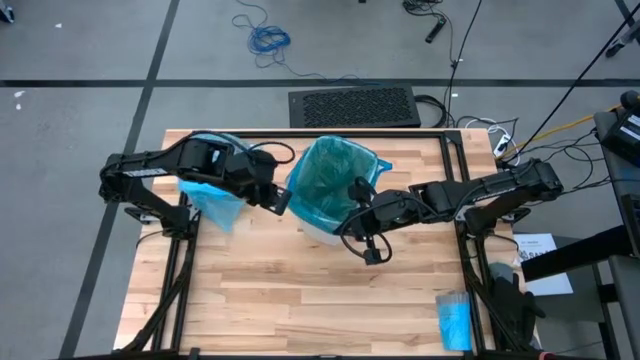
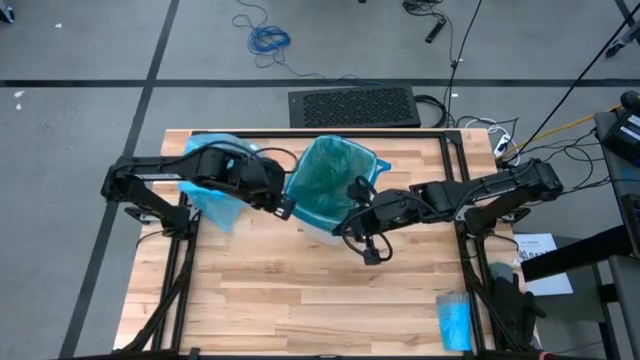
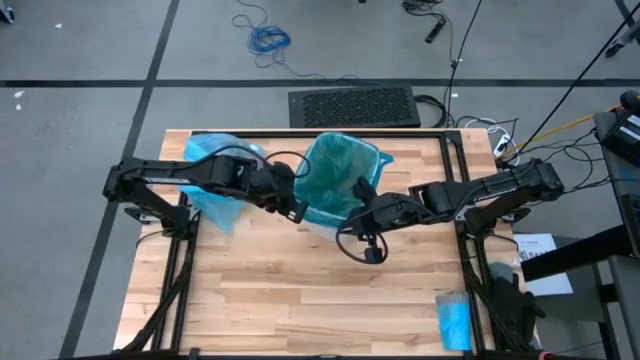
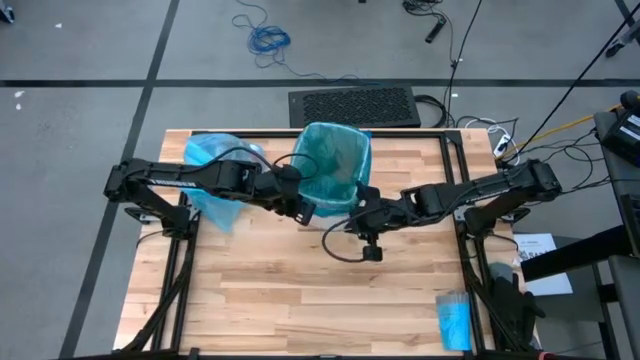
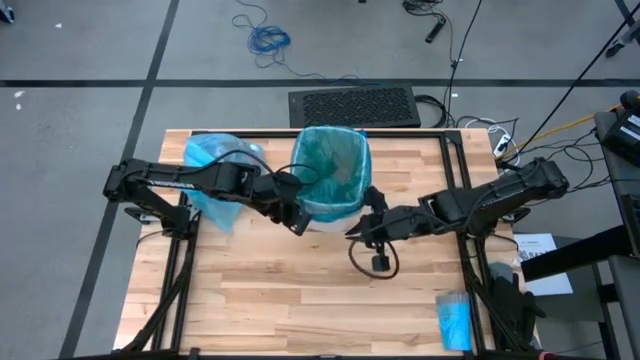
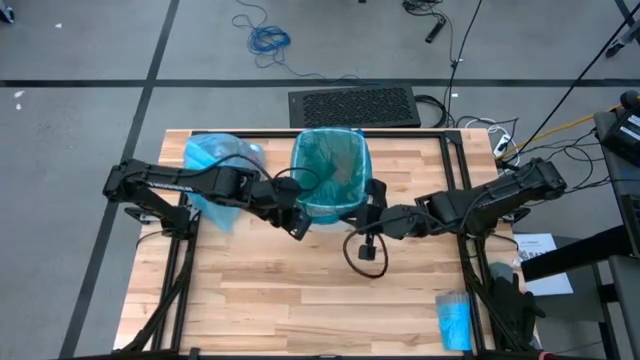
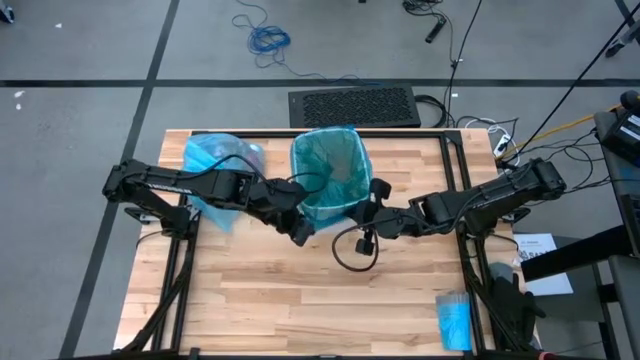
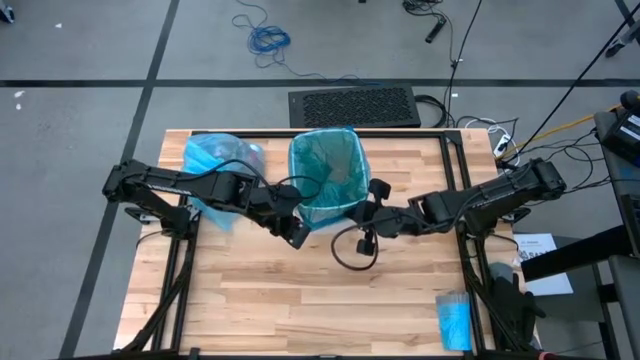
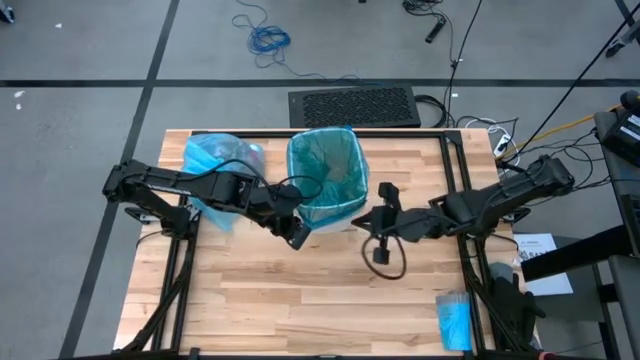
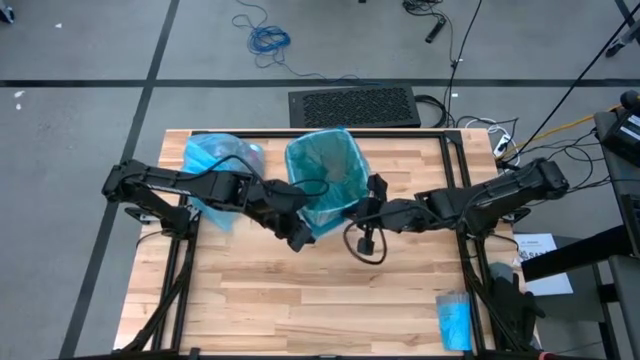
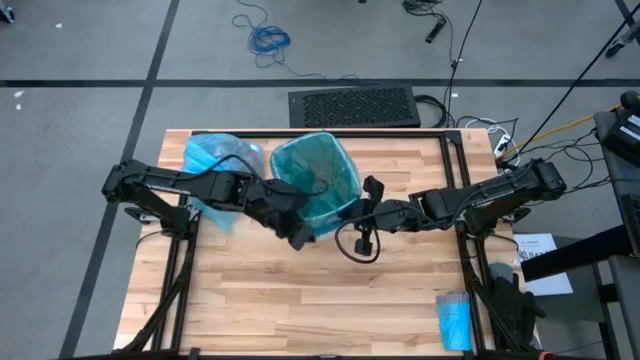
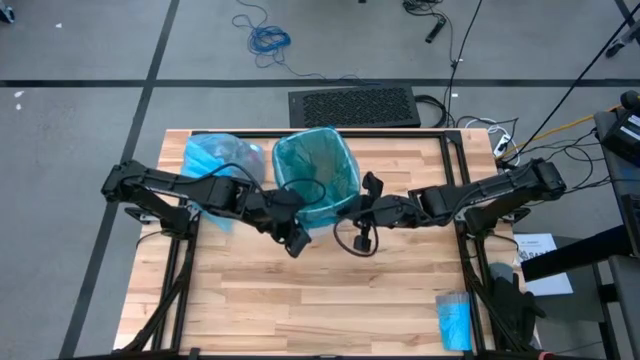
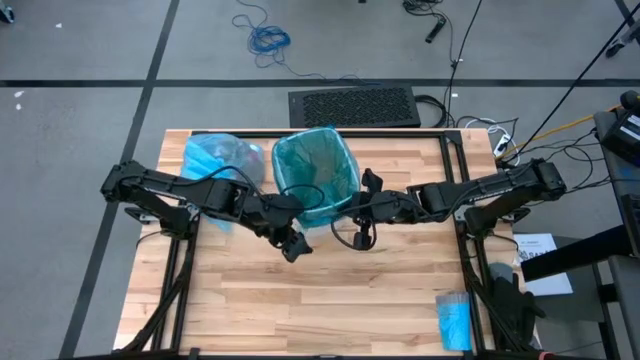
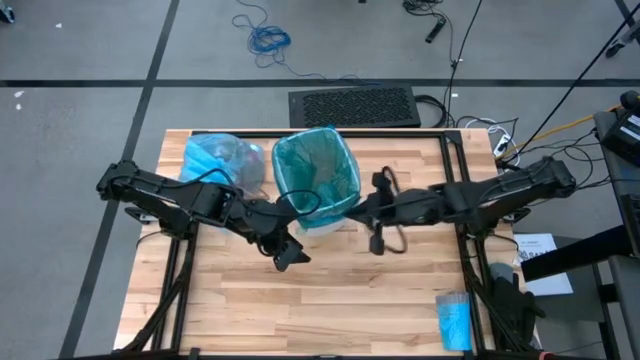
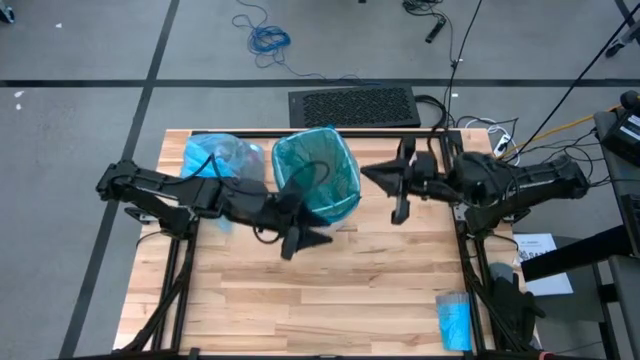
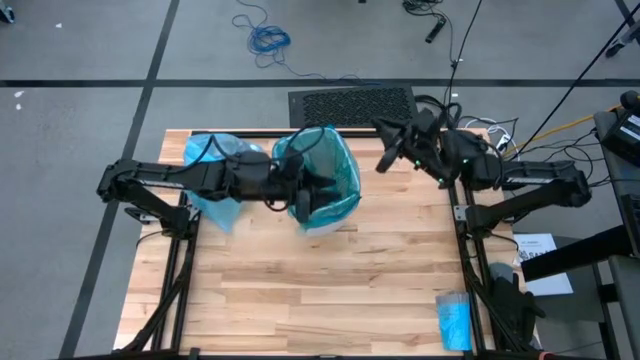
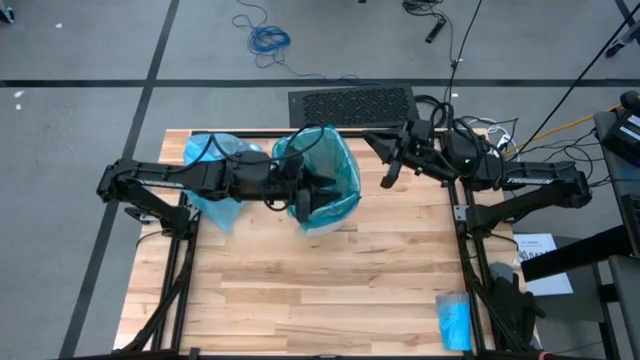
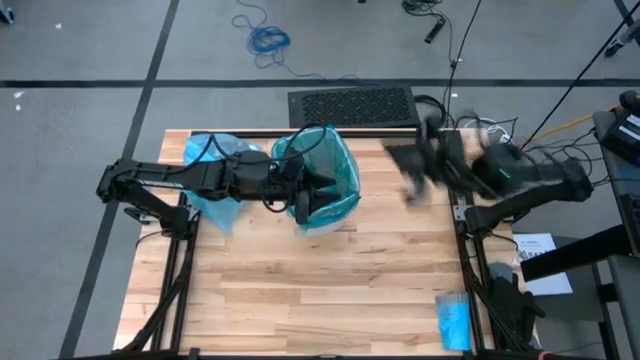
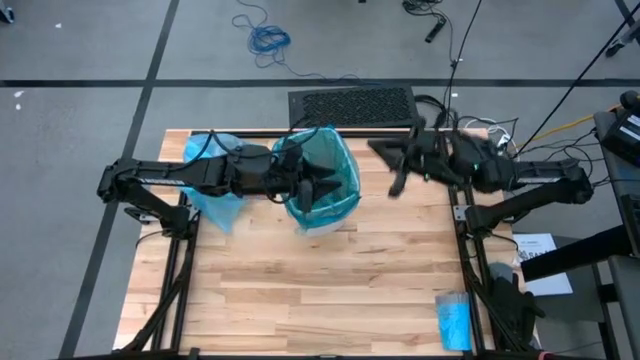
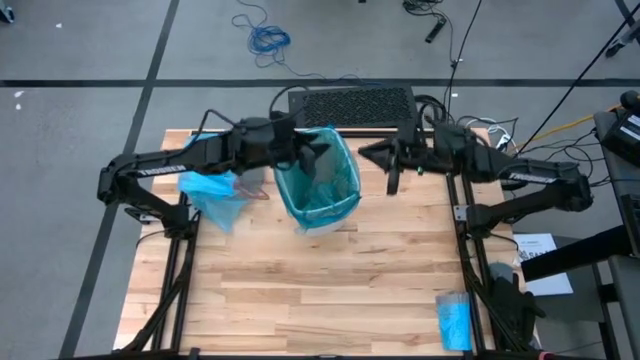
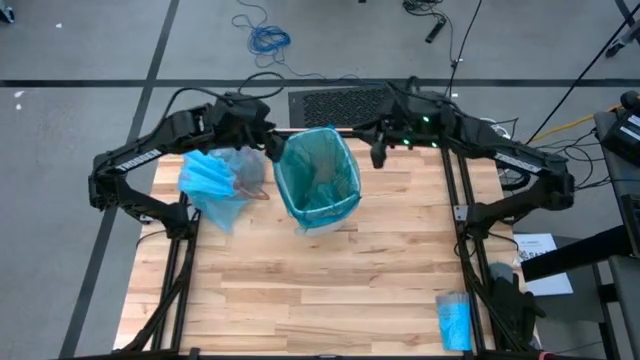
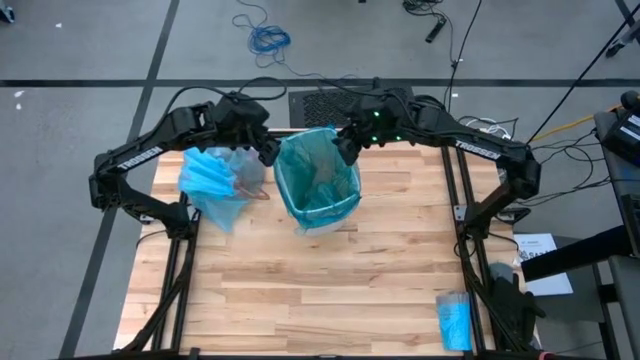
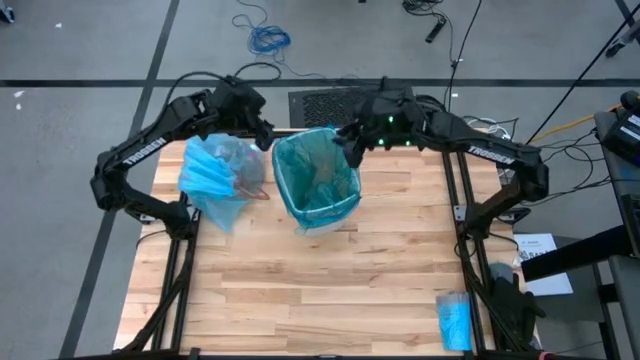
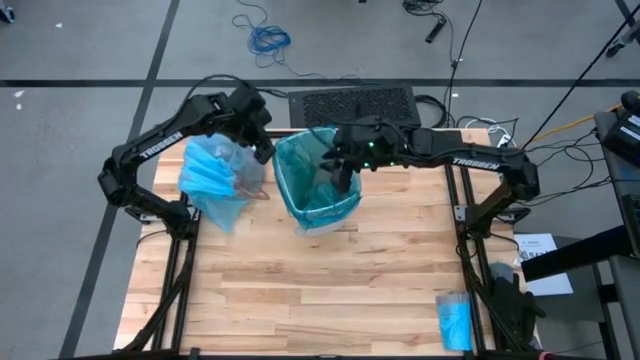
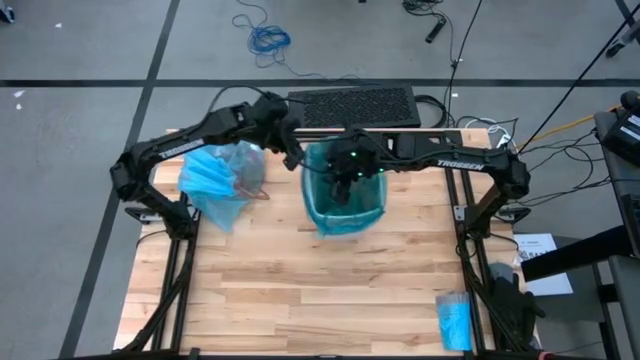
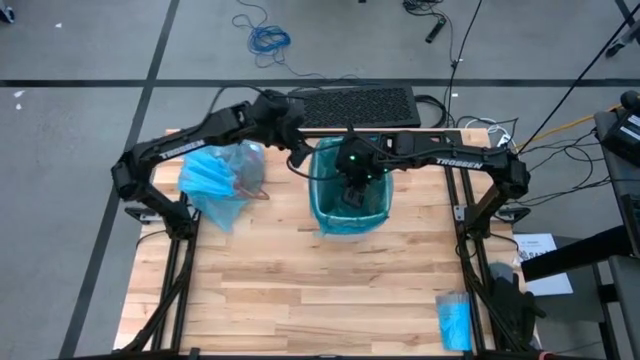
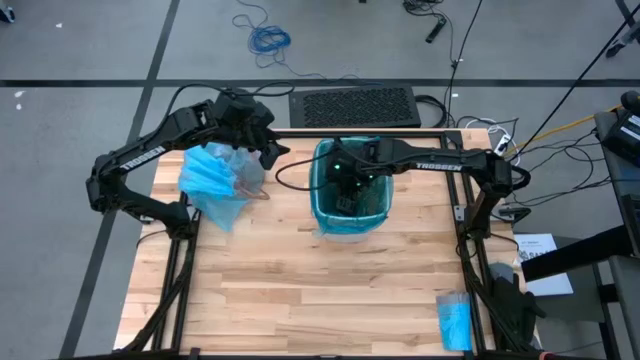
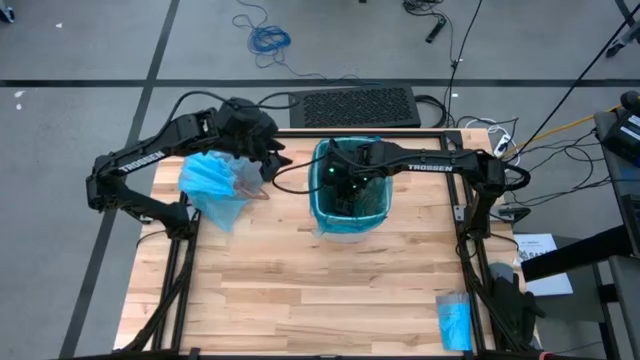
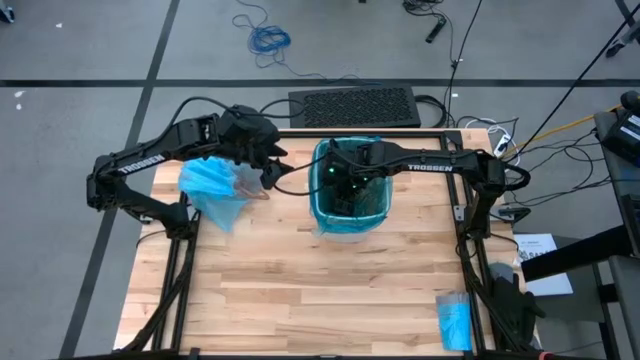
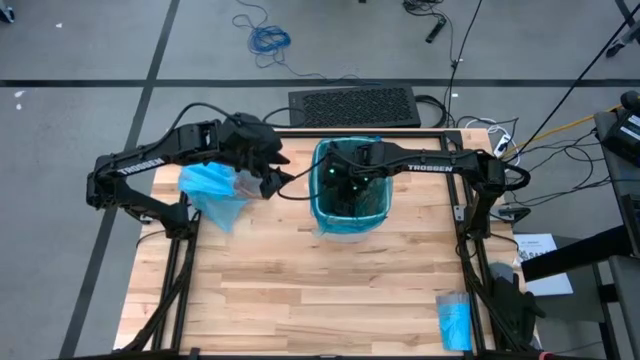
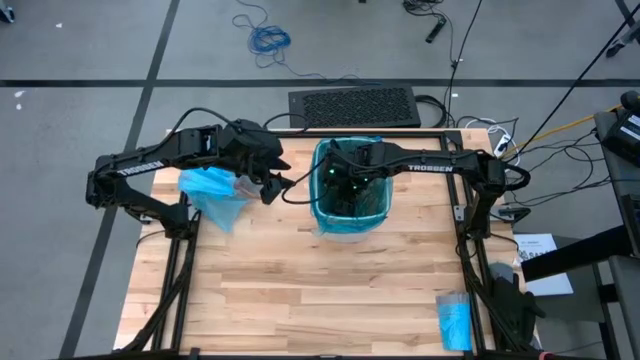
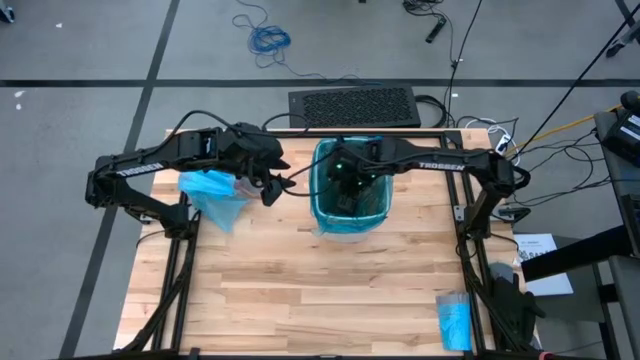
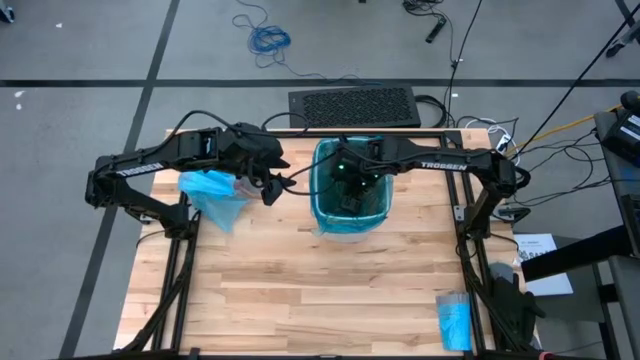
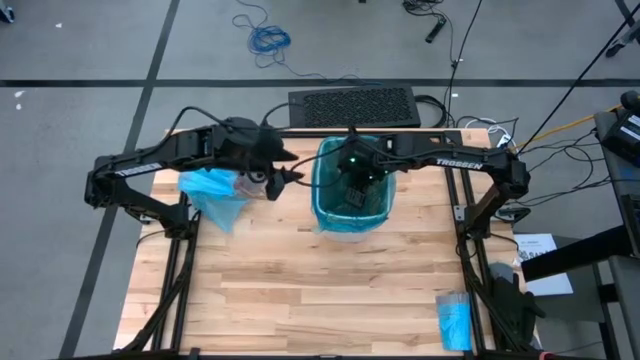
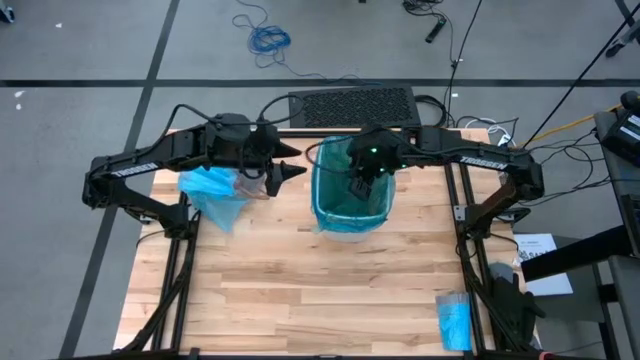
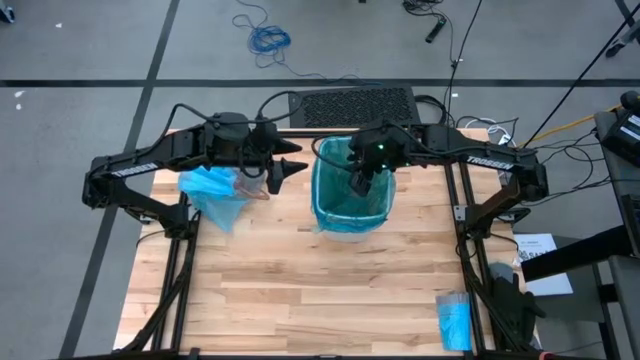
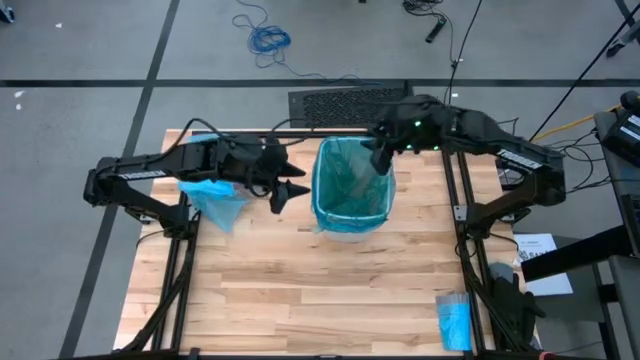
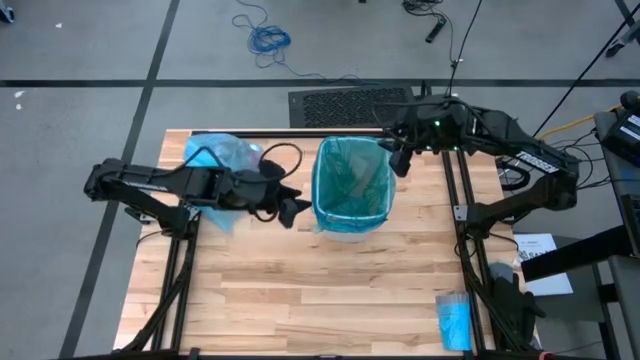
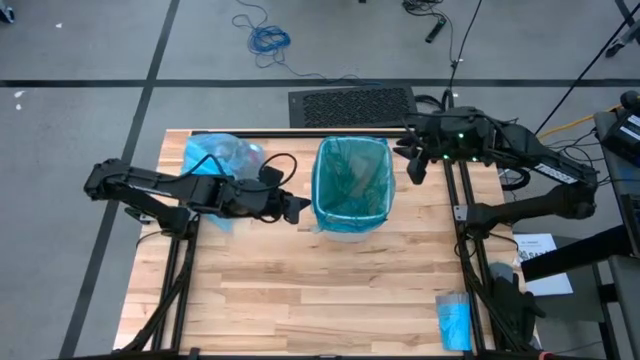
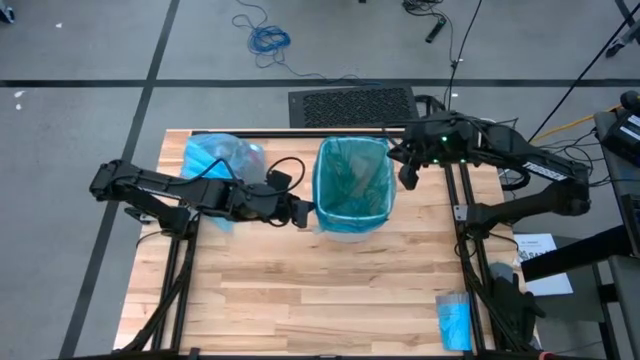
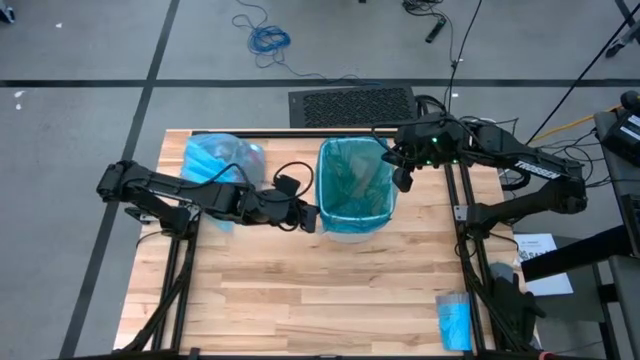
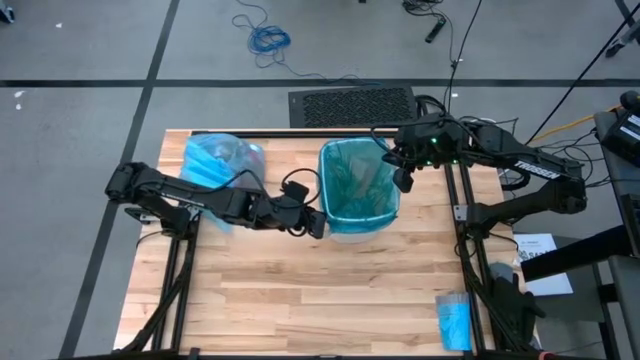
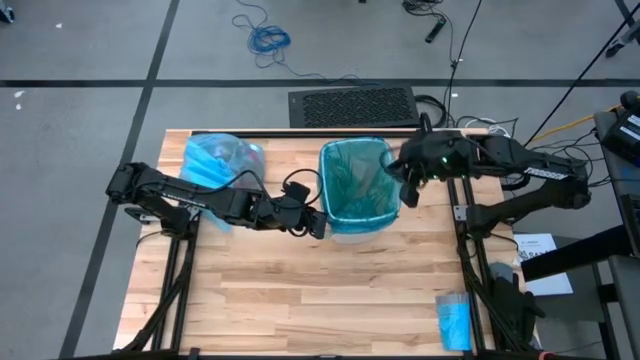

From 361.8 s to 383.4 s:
Task: place trash/remove bag and relplace
Insert the new blue trash bag into the white trash bin
